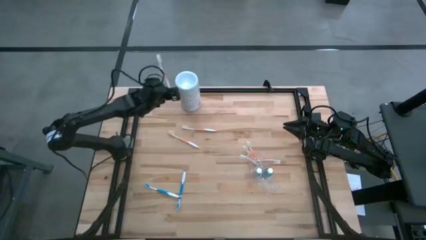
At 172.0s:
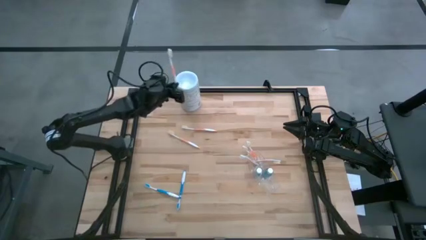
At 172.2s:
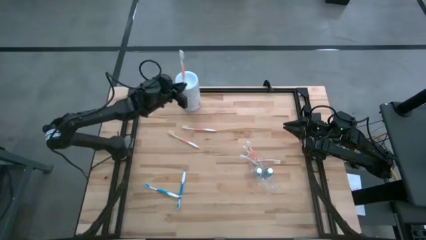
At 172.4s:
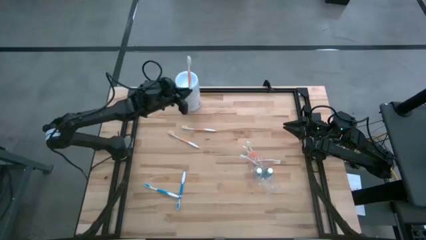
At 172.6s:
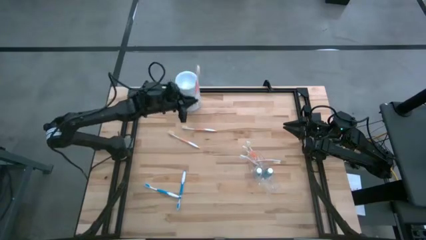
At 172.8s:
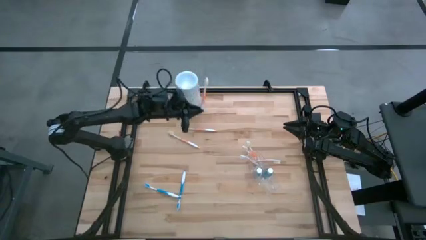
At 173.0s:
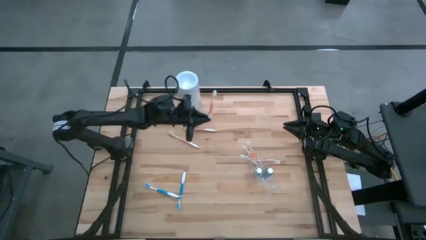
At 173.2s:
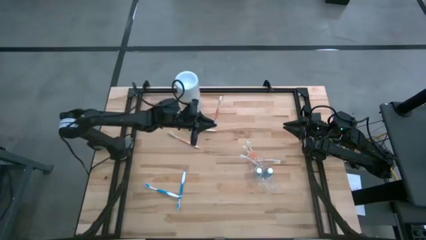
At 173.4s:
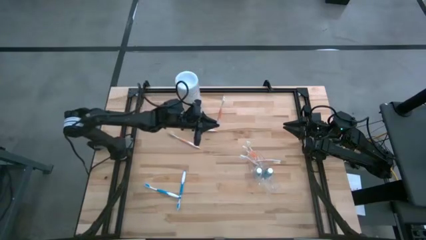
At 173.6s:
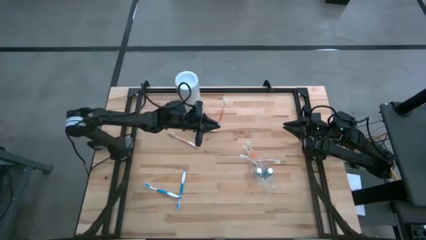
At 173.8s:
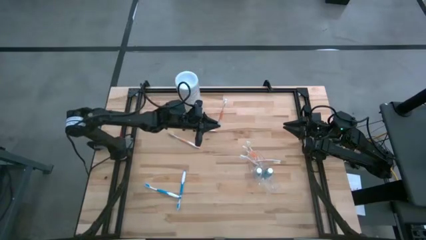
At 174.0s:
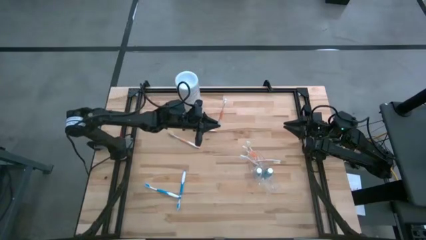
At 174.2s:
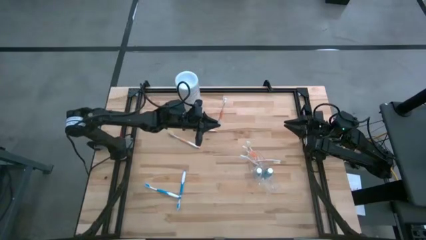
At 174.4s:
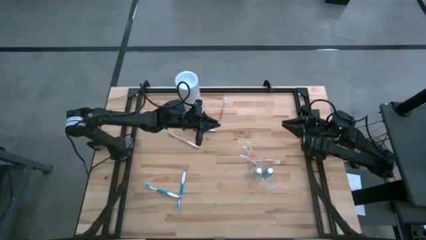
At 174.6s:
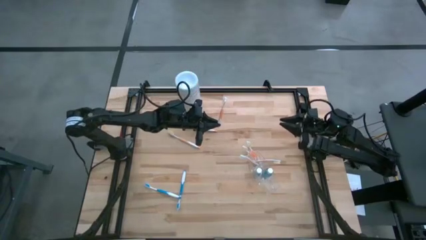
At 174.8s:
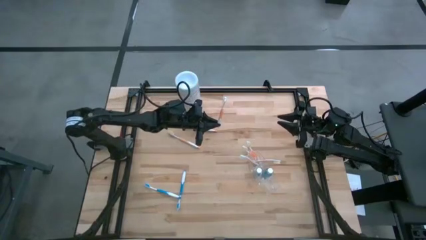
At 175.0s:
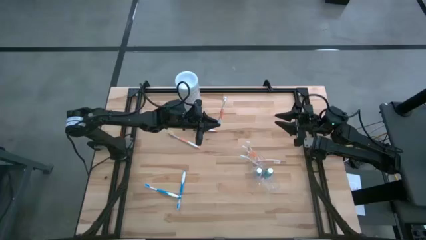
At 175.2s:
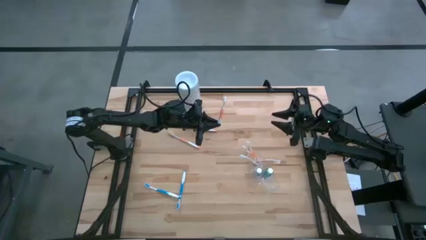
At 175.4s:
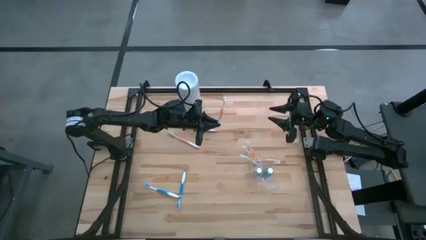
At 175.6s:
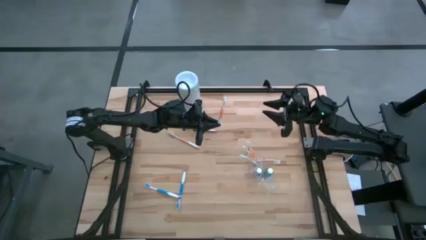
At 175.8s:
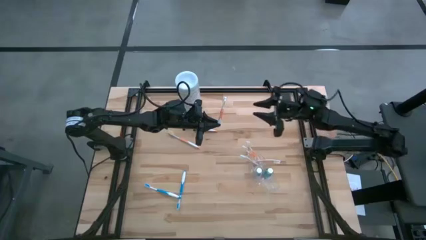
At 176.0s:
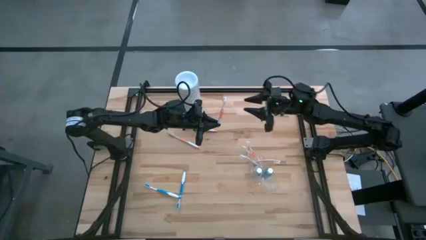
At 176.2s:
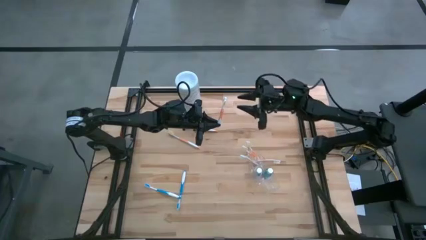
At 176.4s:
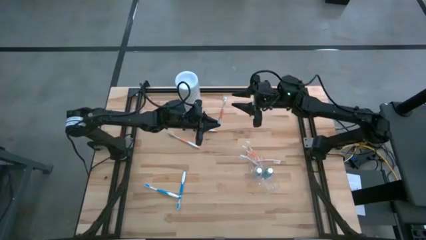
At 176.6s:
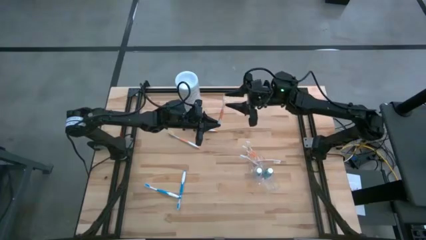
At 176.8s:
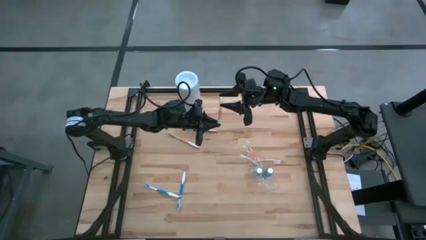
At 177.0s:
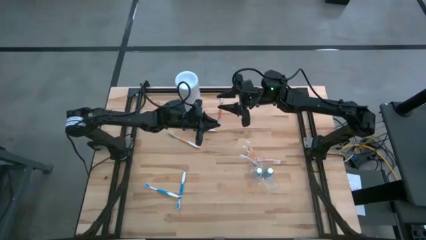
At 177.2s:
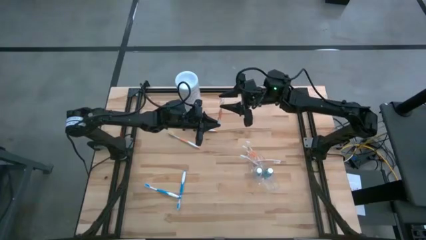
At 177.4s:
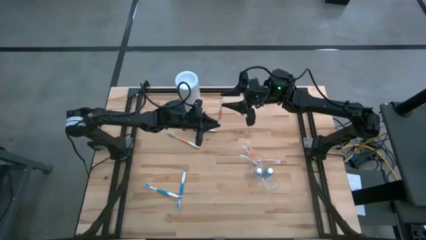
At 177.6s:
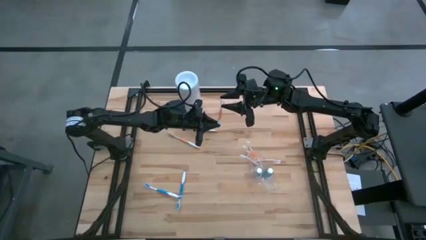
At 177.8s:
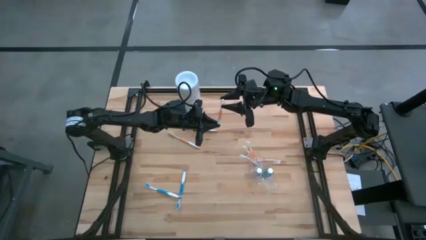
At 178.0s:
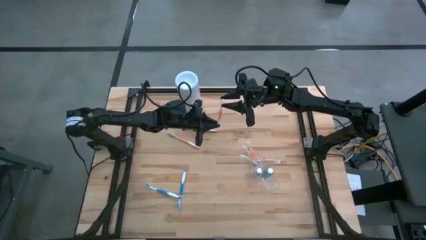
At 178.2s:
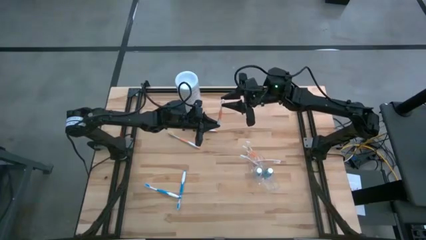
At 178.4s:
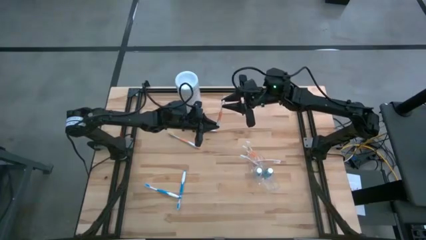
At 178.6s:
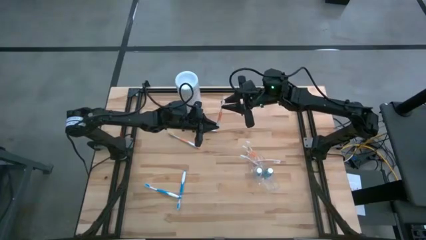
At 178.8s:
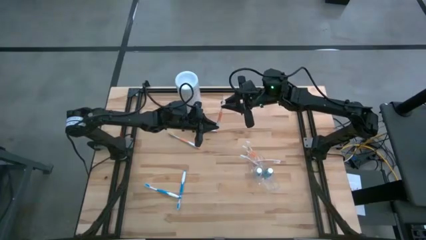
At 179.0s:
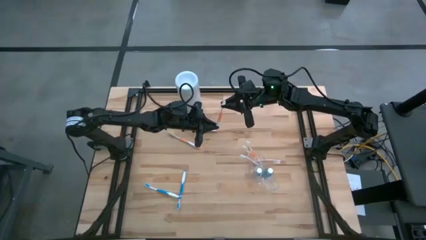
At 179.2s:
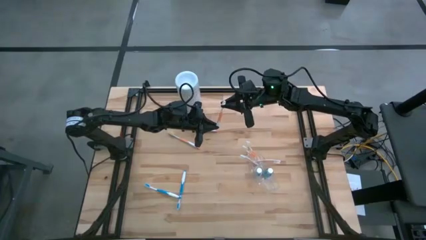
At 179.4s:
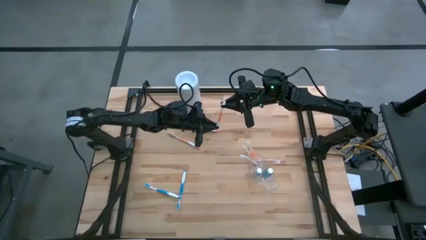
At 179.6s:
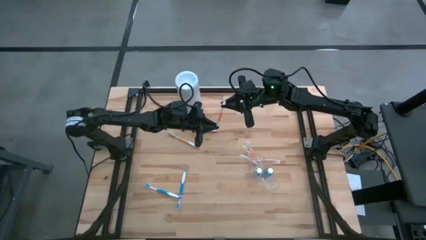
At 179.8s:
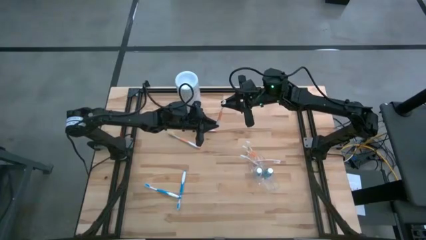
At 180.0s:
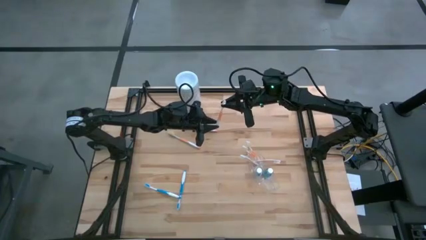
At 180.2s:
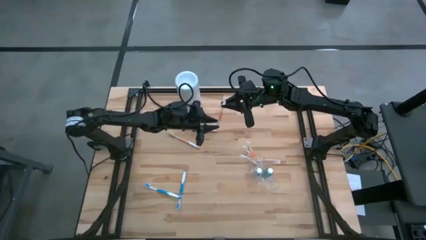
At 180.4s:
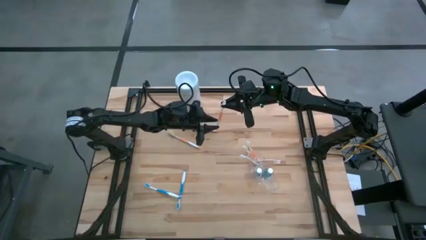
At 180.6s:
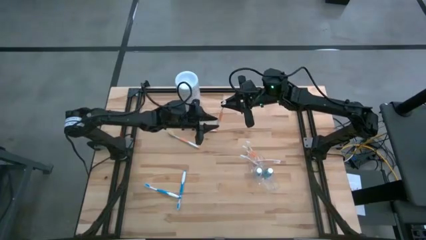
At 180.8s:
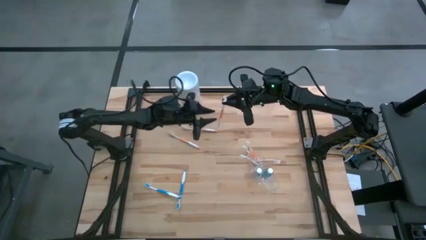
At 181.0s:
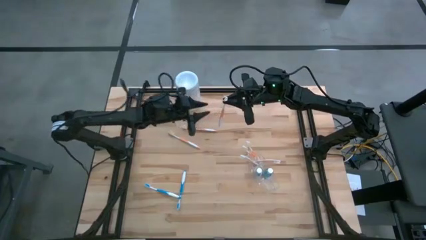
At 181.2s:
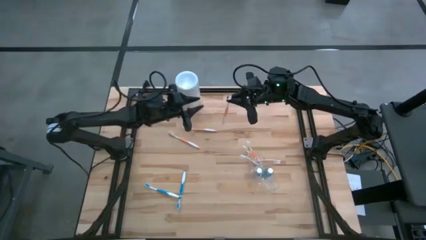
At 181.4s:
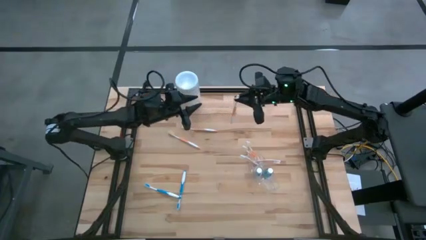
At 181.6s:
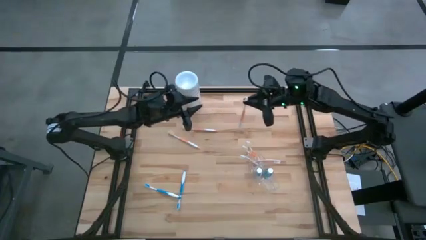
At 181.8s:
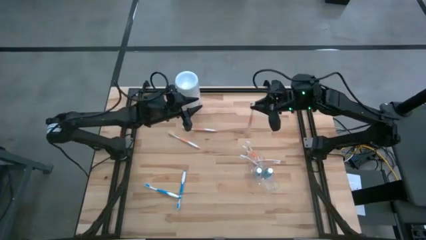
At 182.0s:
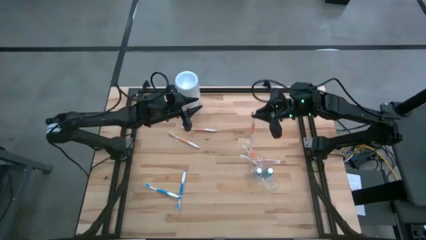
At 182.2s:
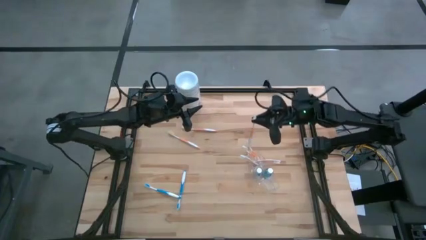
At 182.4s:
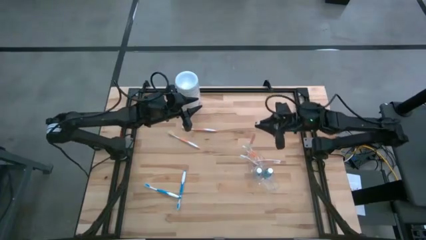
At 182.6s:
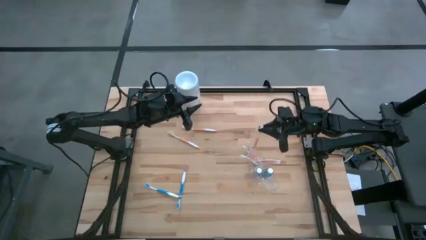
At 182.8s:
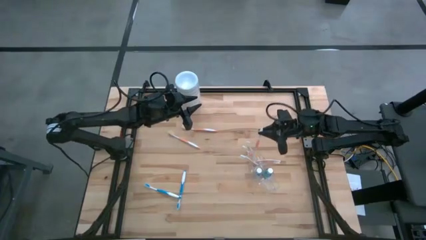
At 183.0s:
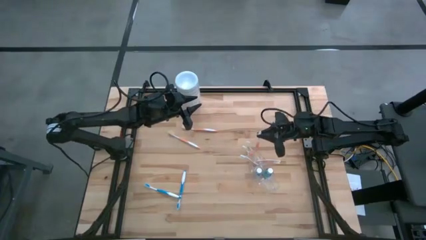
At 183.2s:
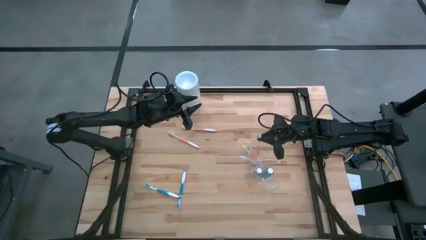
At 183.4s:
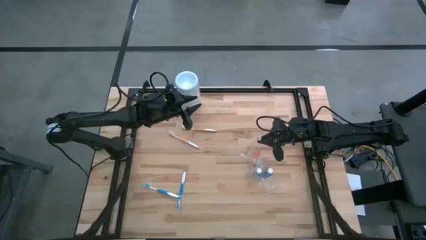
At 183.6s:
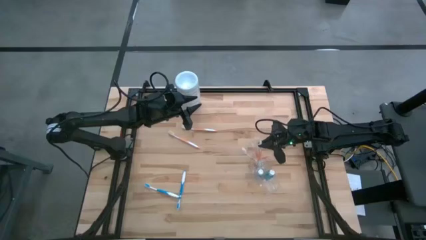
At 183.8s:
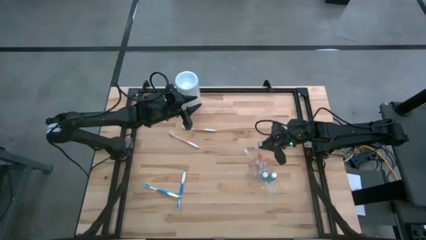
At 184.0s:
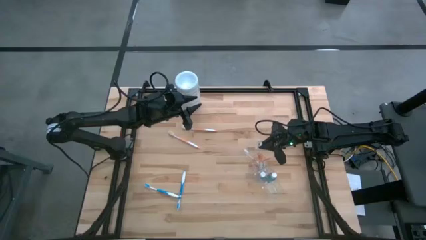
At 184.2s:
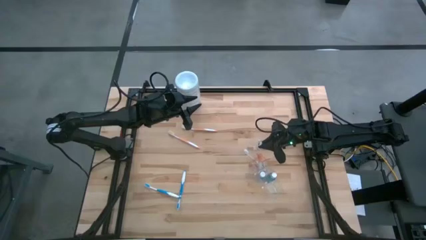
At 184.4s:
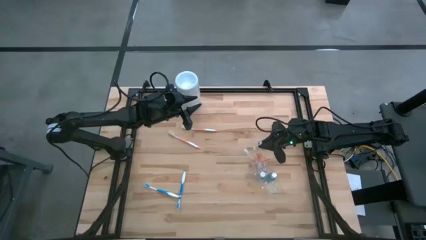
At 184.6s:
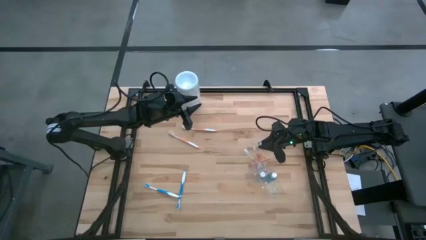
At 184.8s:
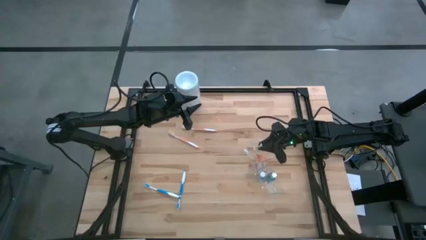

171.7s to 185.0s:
Task: Pick & Place toothbrushing station
Put the orange toothbrush into the top section of the transparent organizer

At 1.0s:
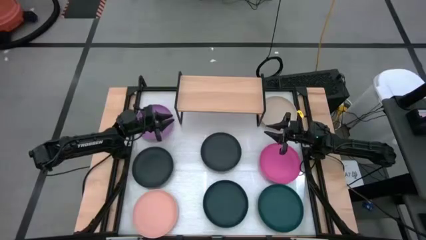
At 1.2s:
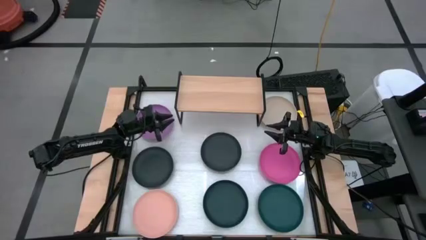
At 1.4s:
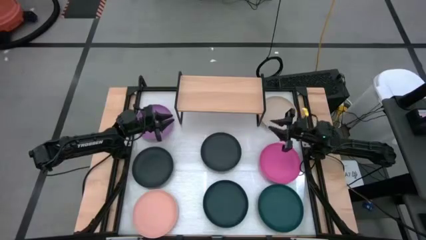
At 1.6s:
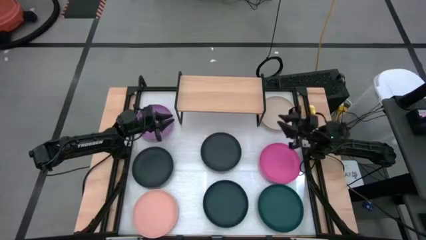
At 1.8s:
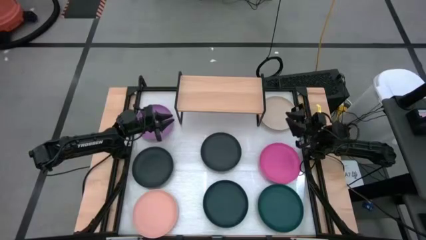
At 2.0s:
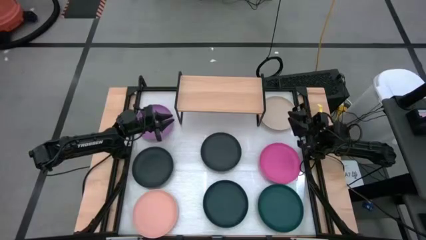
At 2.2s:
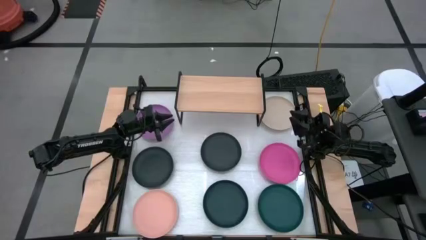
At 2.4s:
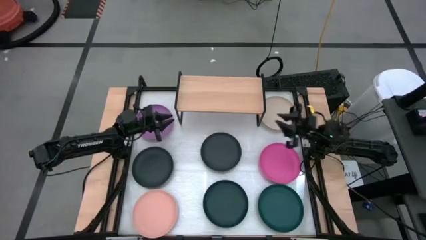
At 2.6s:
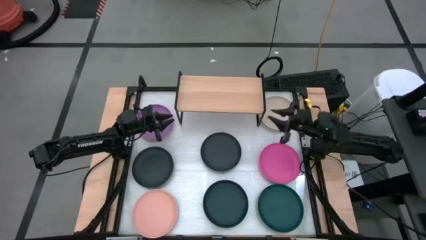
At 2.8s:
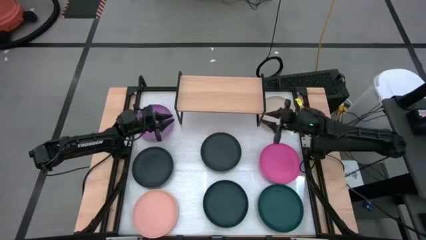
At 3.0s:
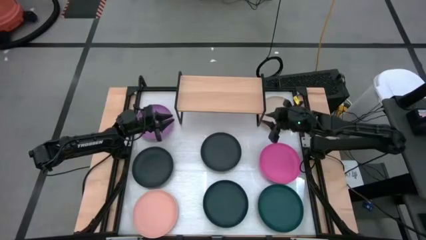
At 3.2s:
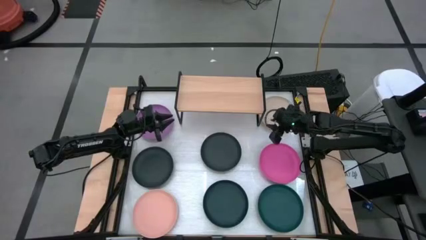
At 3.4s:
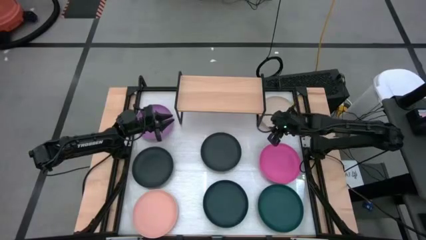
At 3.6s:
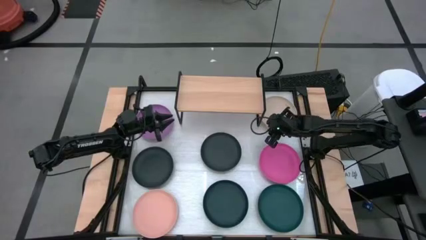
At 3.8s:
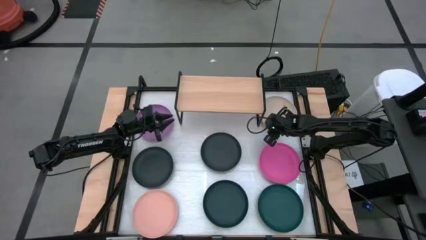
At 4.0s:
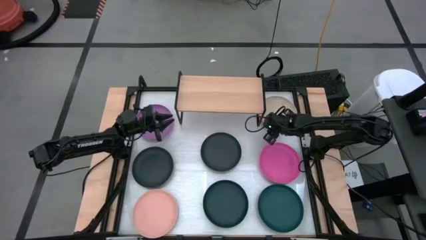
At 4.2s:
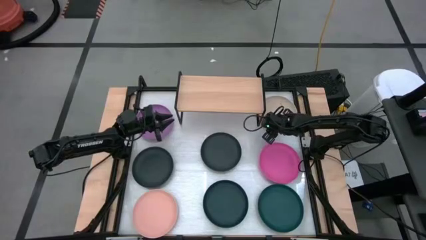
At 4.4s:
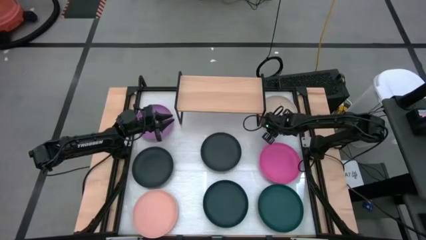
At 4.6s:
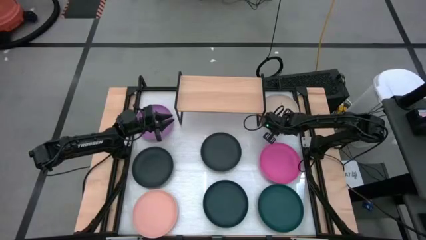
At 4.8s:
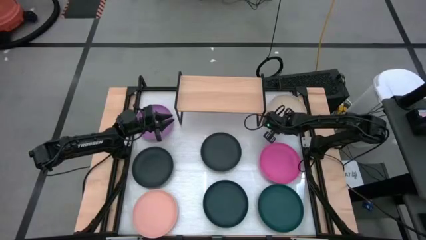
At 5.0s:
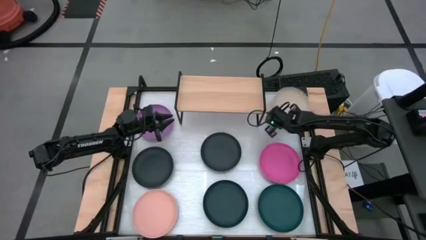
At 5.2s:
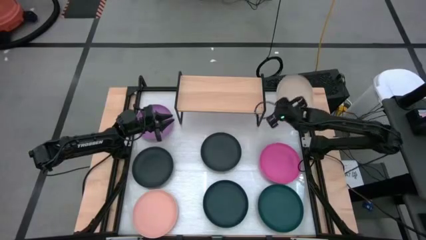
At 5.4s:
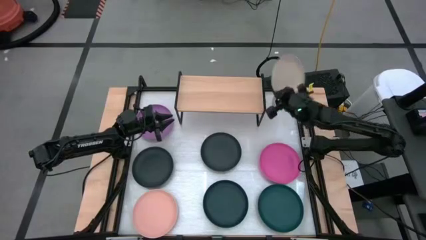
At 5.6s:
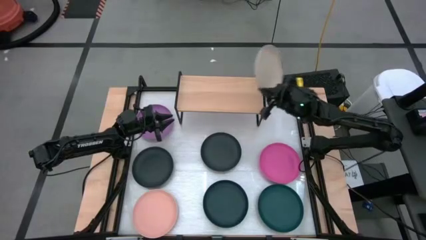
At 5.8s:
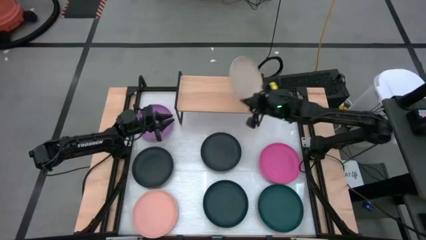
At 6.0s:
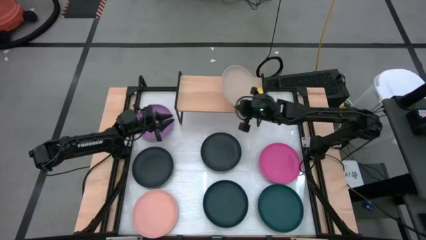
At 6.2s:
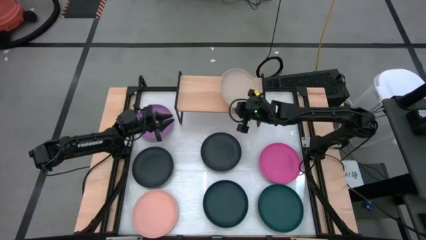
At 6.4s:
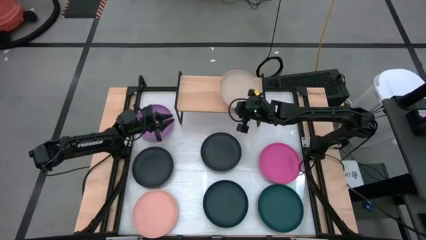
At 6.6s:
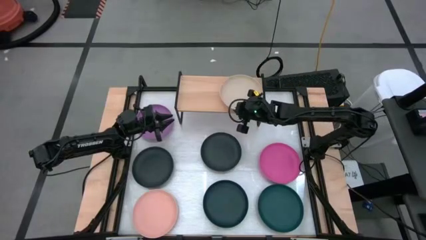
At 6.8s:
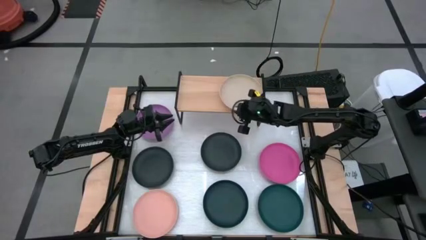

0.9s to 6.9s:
Task: Place and stack plates onto a shelf
Put the light brown plate on the shelf
